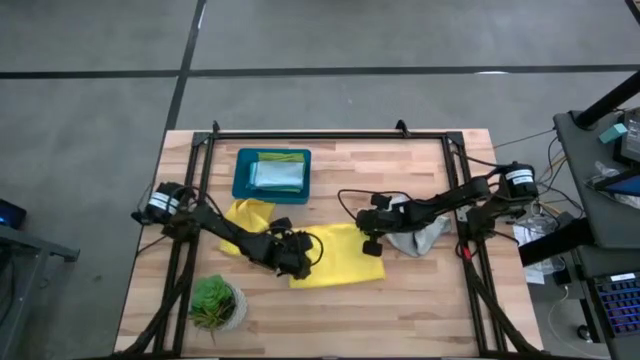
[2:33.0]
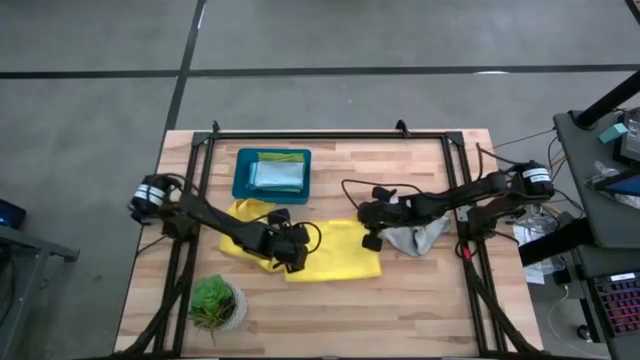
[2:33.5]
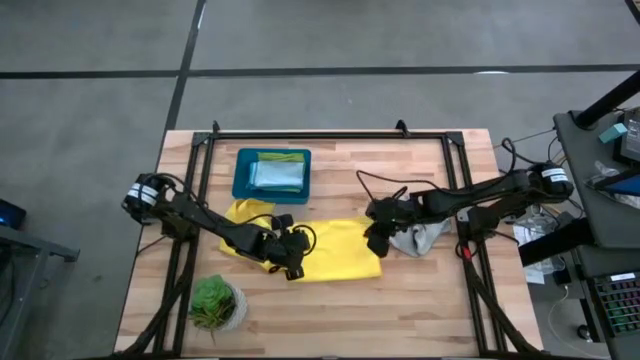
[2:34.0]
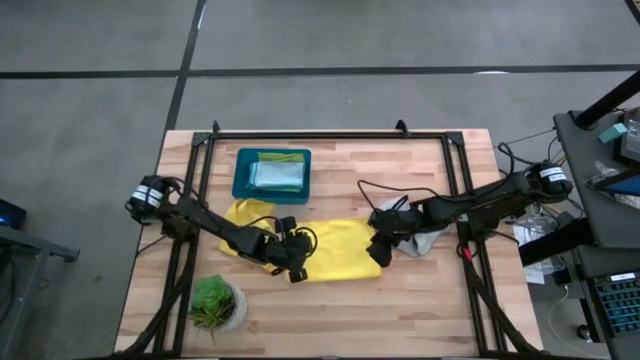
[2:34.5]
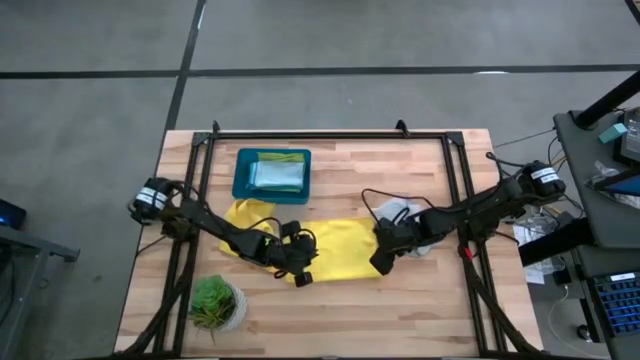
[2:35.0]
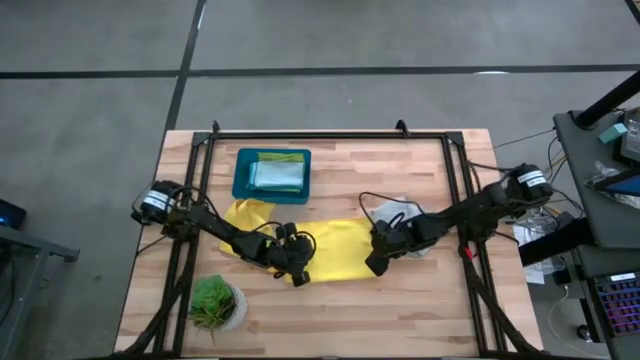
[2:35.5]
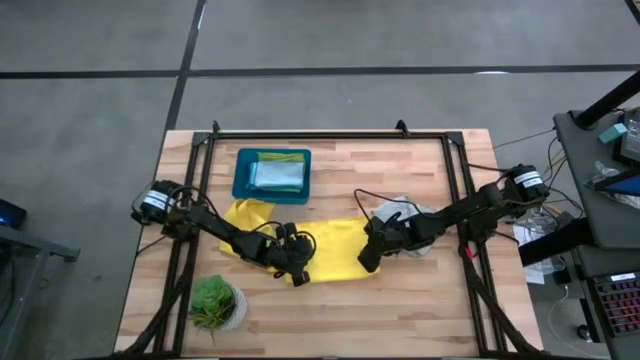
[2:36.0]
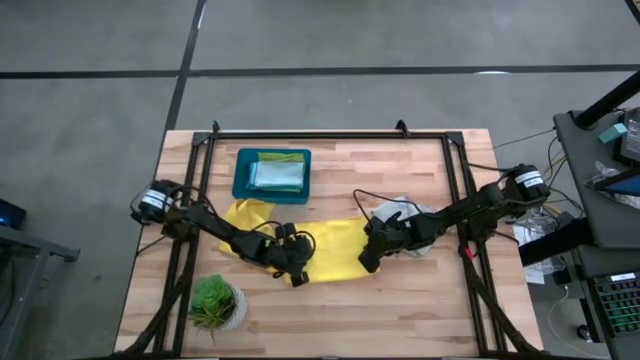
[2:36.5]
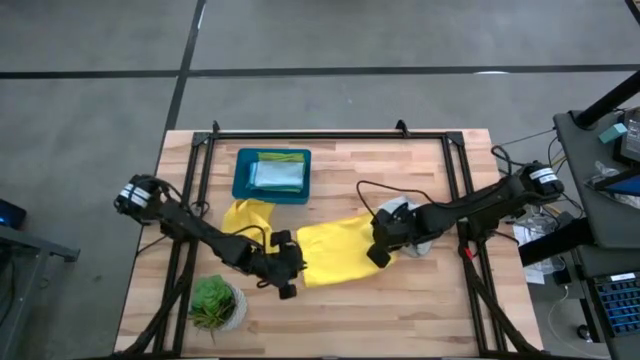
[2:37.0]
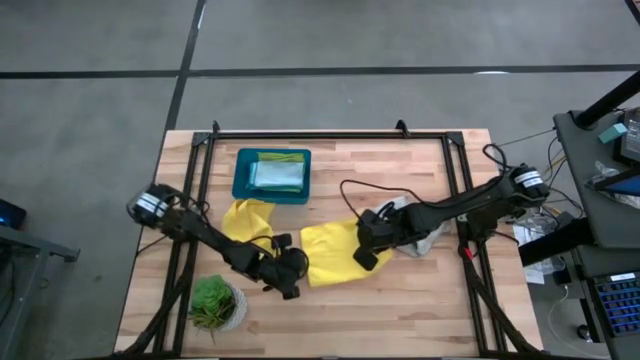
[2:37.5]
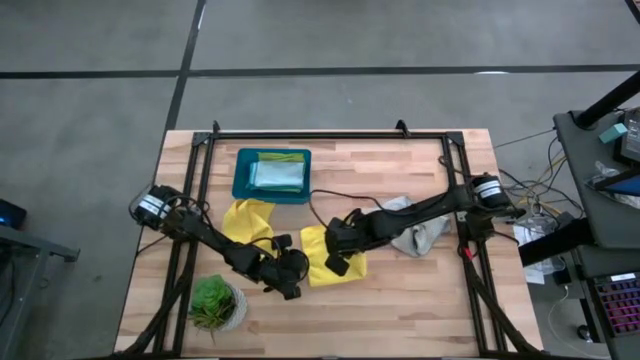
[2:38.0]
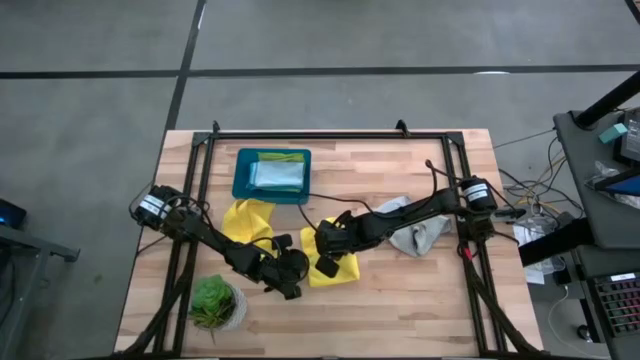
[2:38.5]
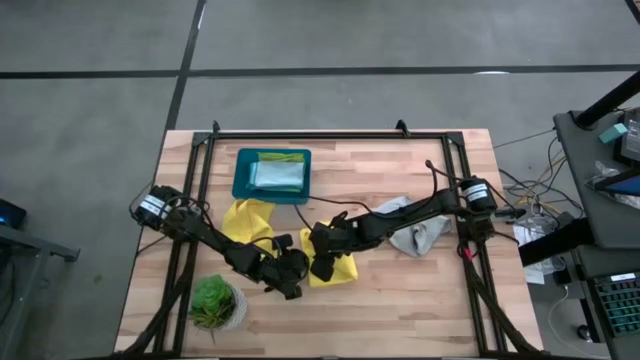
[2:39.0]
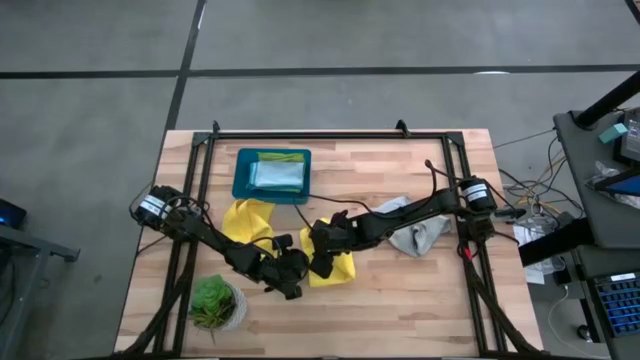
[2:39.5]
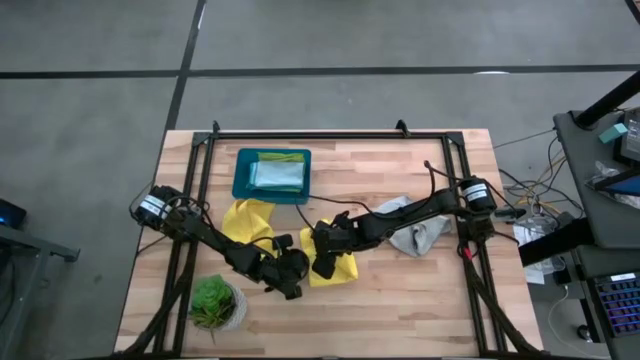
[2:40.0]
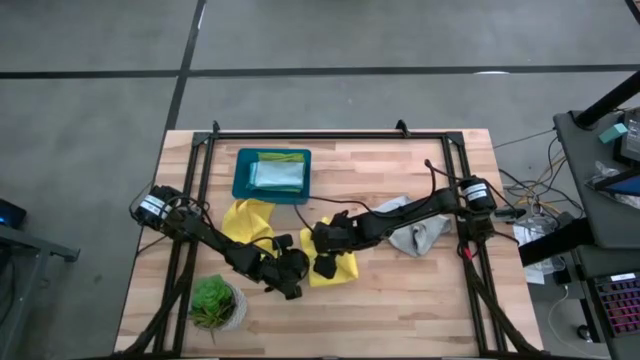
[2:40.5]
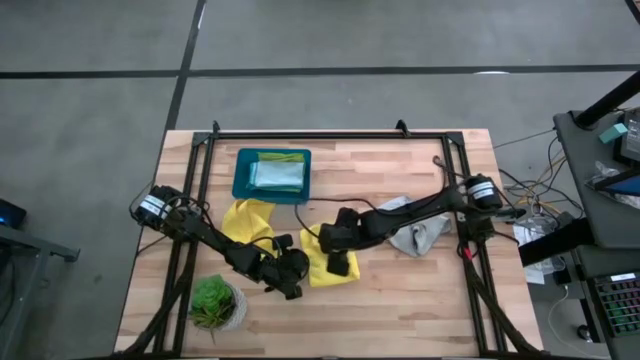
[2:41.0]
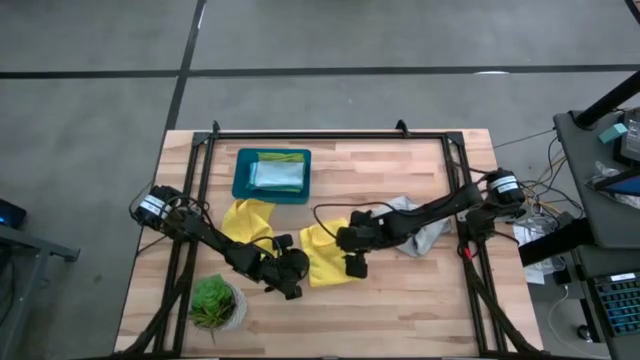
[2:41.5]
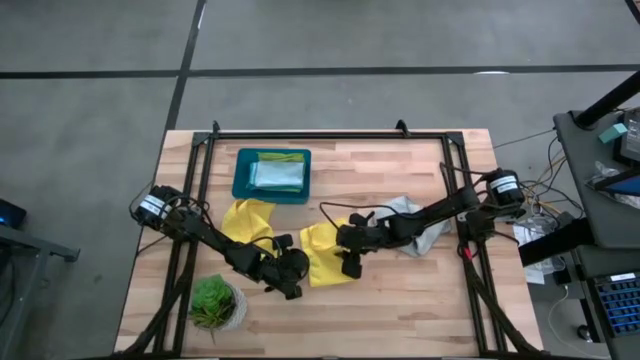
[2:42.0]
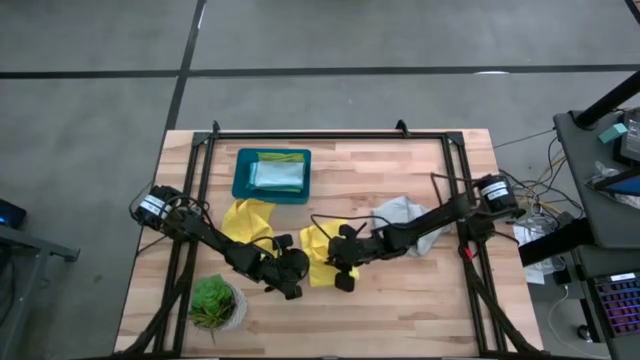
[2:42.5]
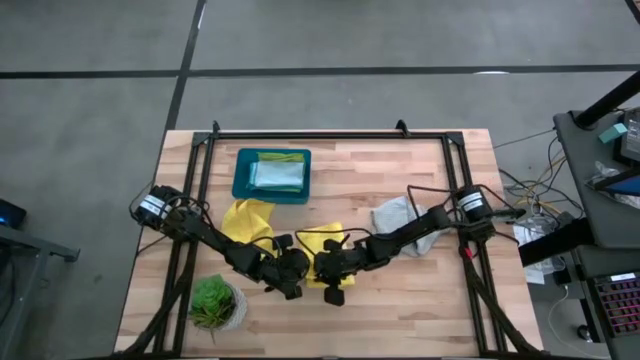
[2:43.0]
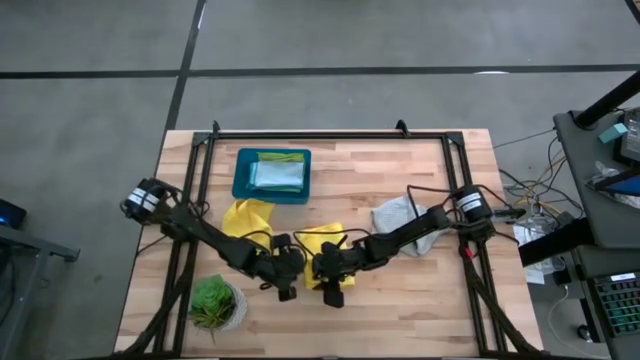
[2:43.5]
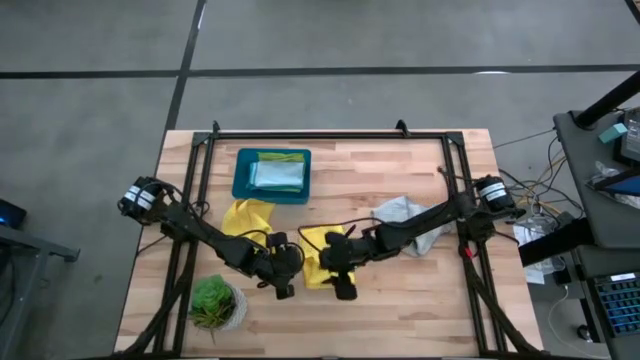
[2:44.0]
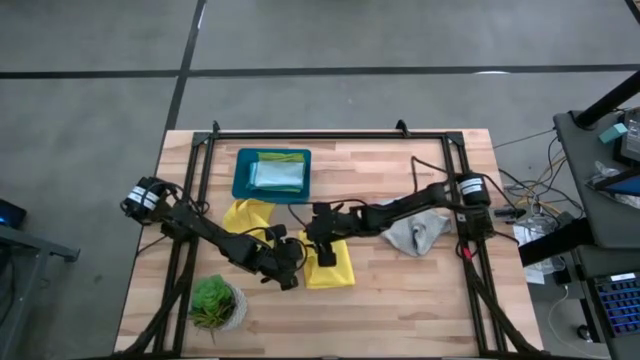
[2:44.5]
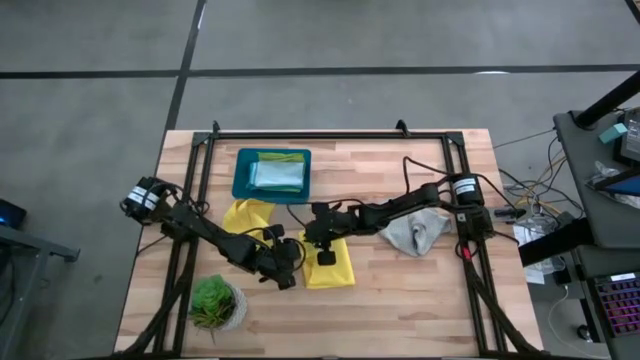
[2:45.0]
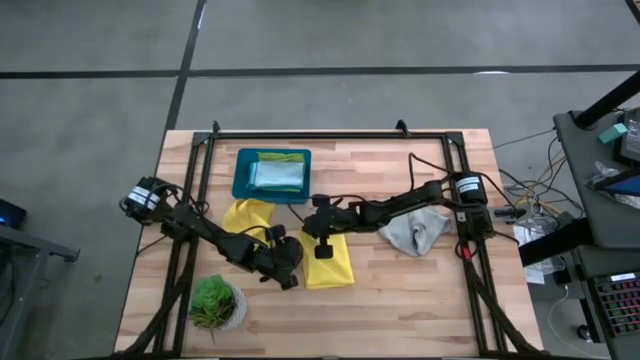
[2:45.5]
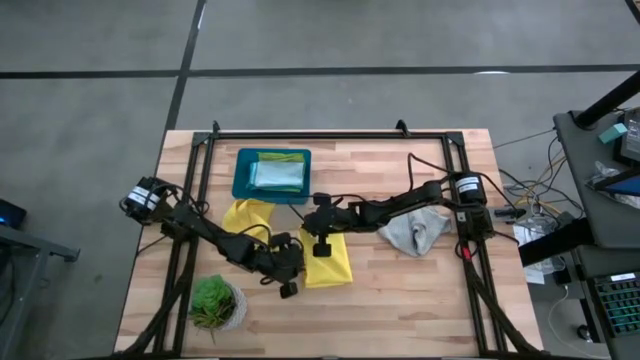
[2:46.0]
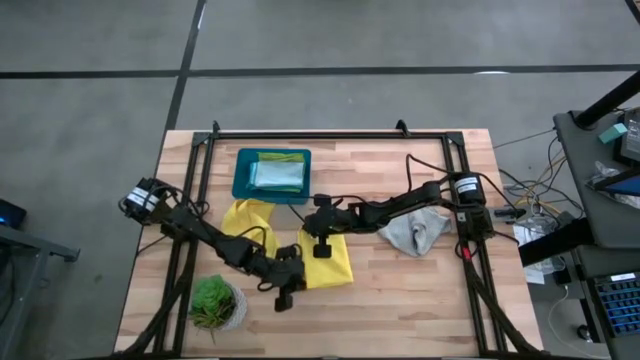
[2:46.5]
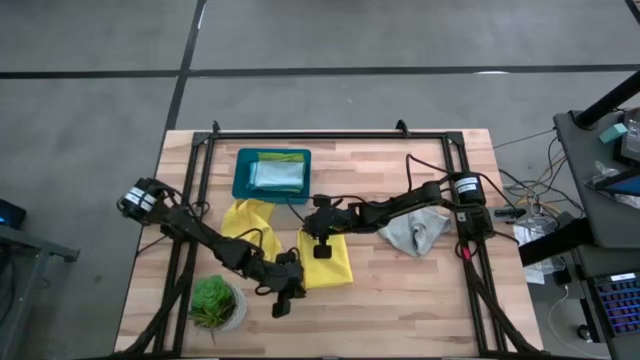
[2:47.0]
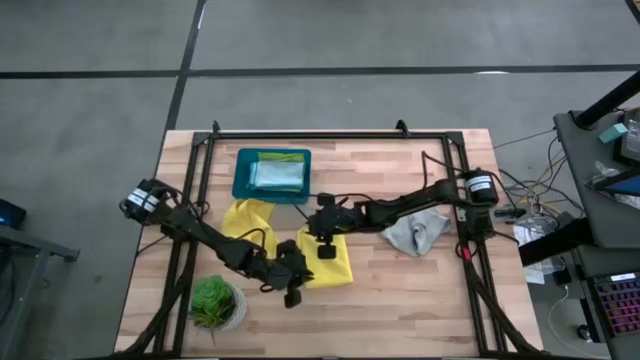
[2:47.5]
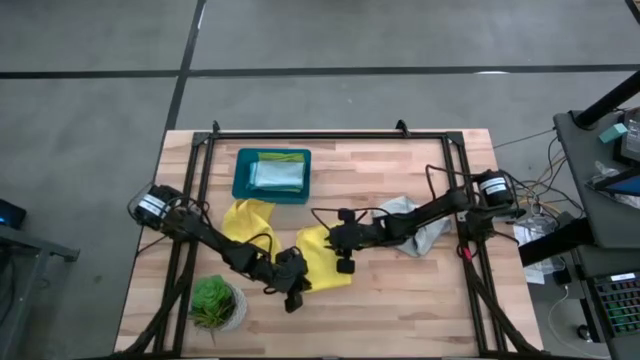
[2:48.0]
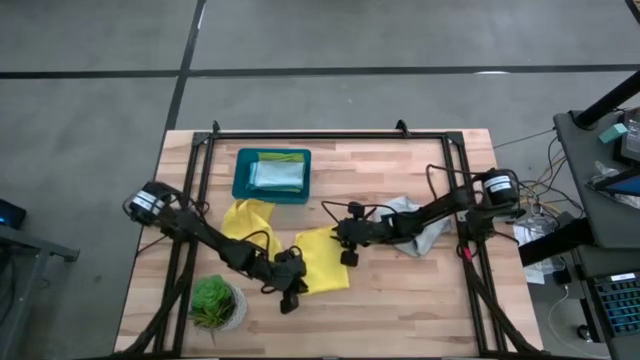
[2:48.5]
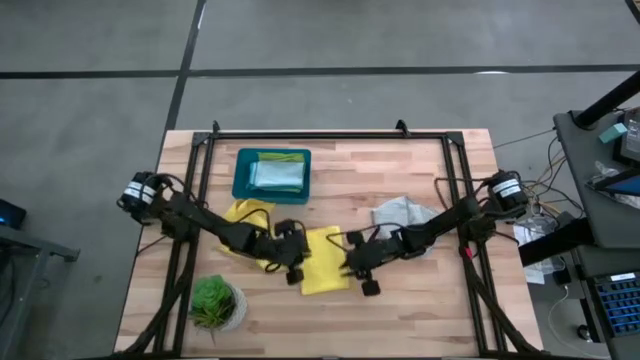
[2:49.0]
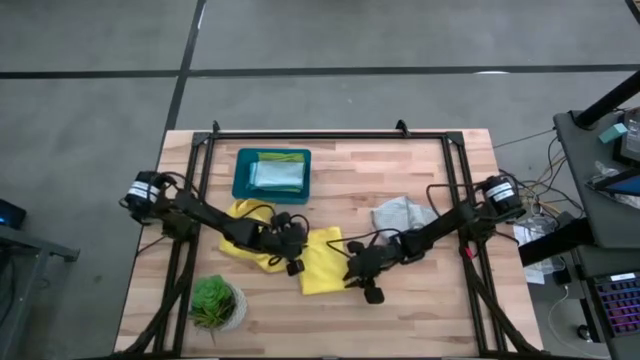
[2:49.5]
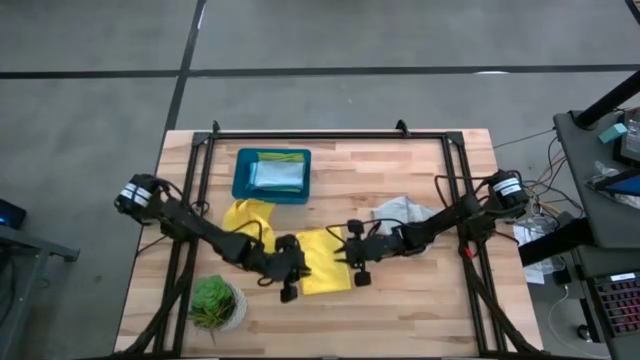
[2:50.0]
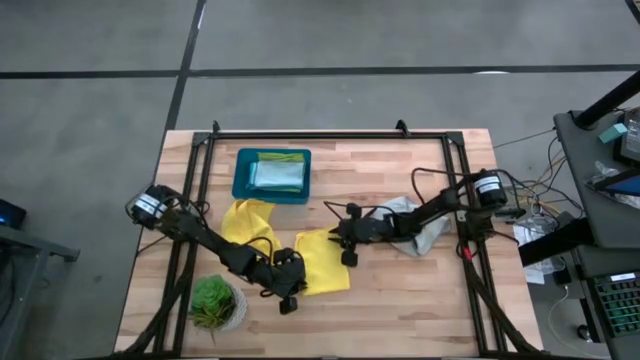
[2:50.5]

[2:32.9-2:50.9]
Task: Fold microfiber towels
Fold the right yellow microfiber towel

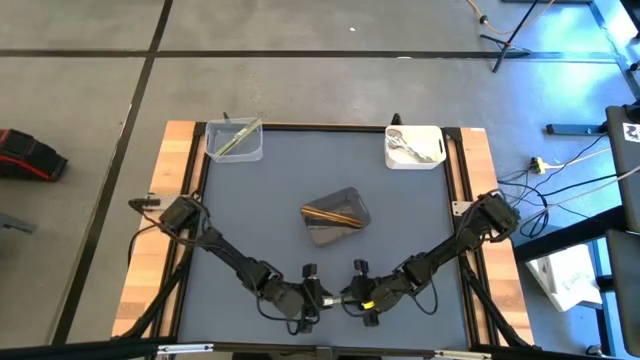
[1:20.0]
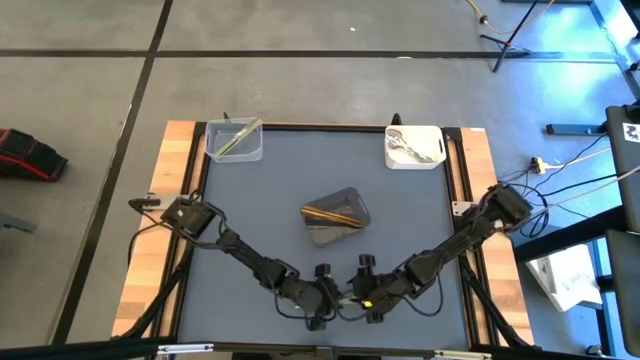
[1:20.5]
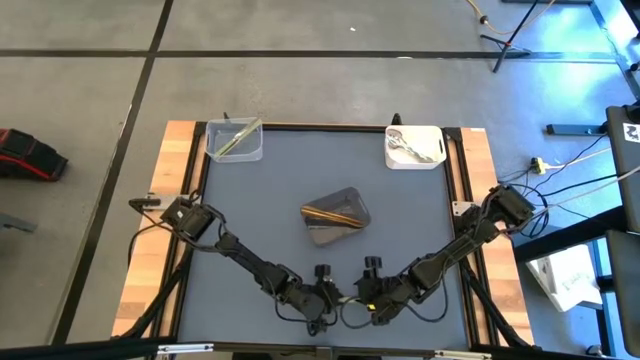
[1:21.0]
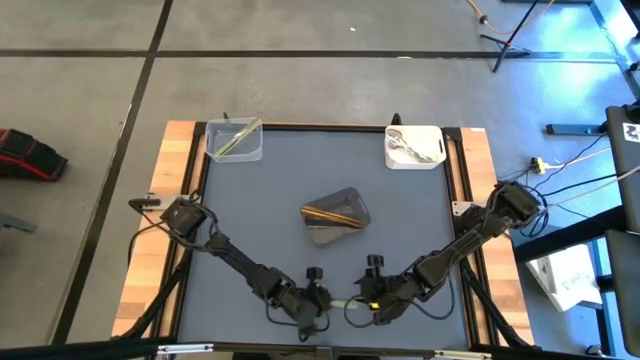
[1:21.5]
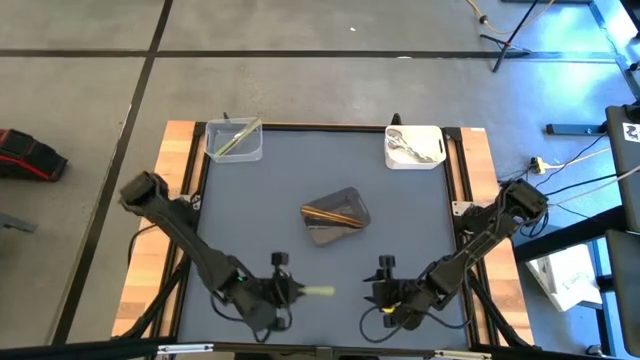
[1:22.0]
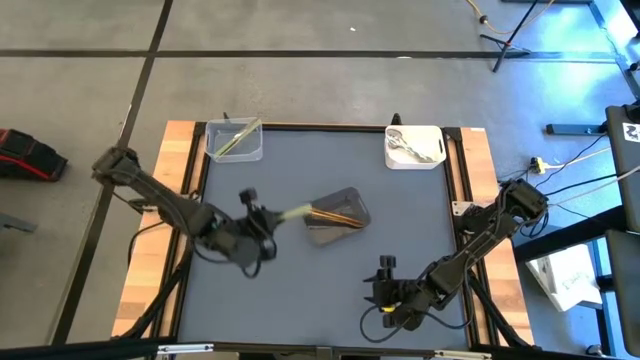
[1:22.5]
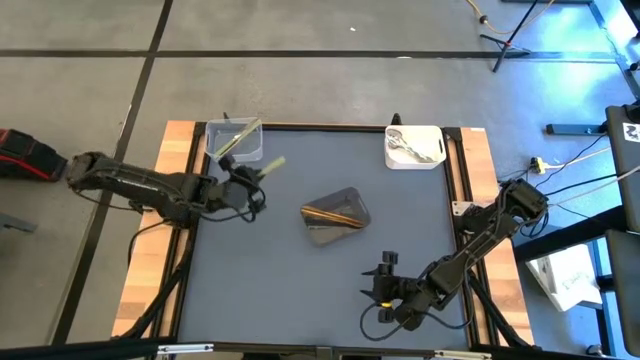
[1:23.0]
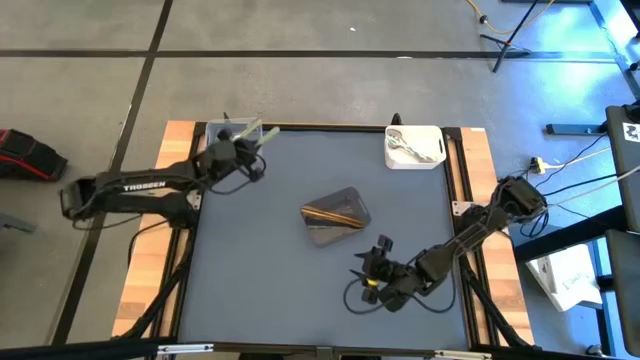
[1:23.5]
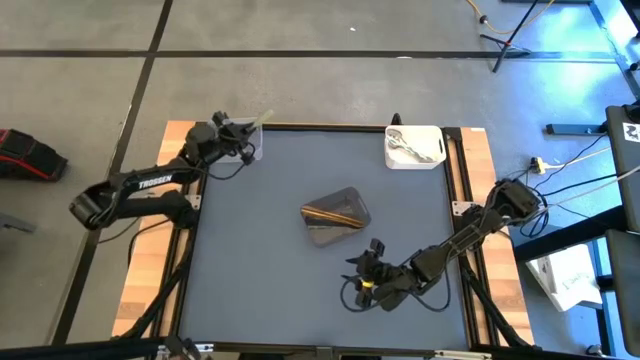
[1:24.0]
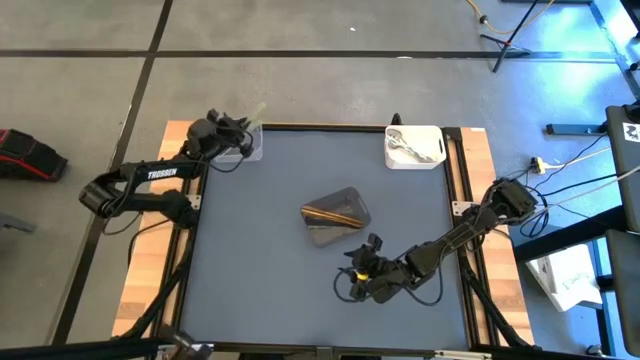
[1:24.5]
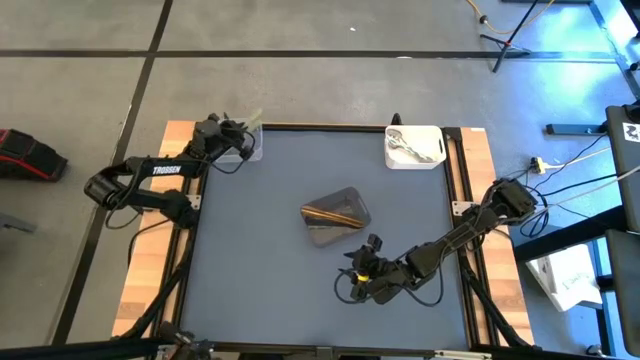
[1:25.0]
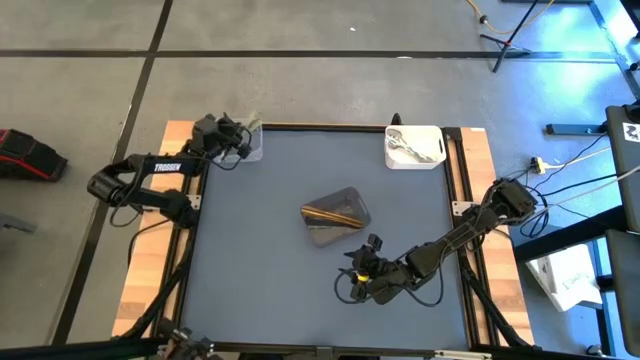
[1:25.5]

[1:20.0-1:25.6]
Task: Sort silverware by color (type)
Put the green table knife into the transparent bin
